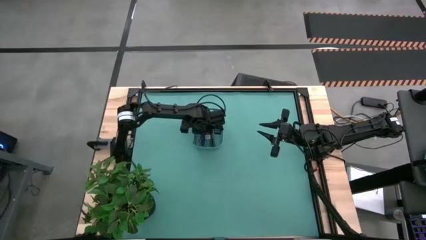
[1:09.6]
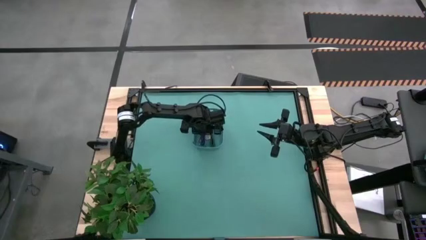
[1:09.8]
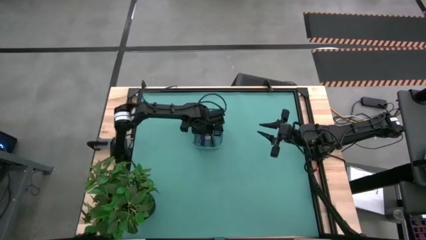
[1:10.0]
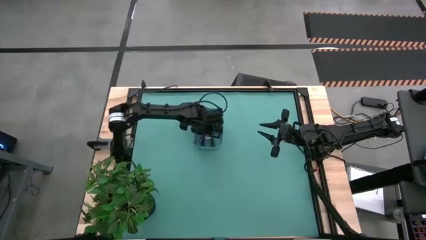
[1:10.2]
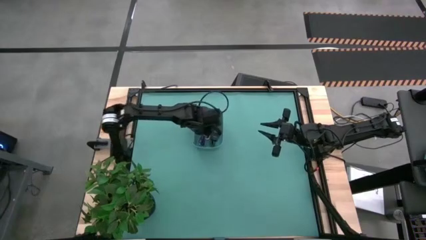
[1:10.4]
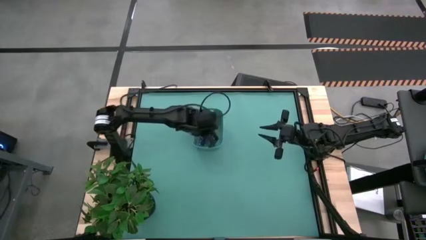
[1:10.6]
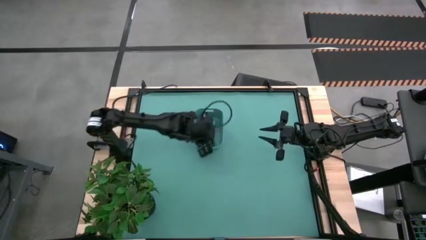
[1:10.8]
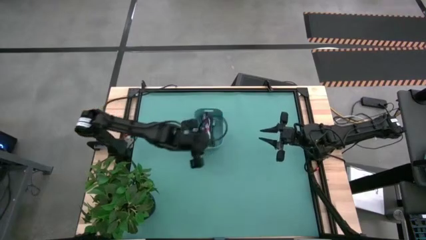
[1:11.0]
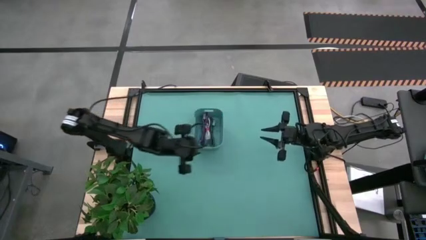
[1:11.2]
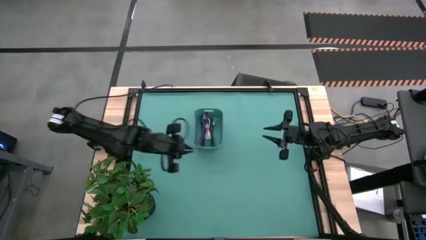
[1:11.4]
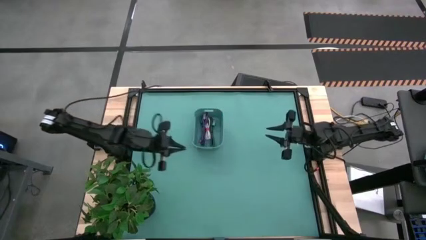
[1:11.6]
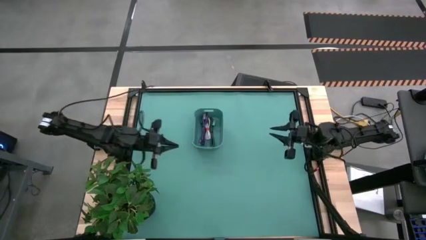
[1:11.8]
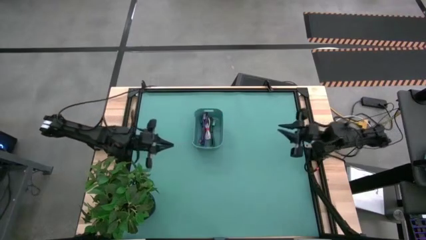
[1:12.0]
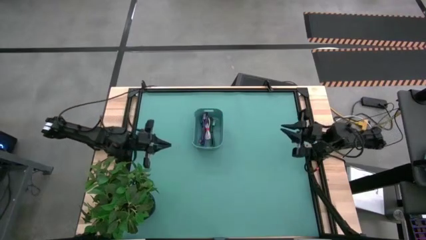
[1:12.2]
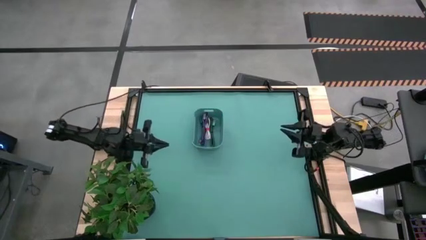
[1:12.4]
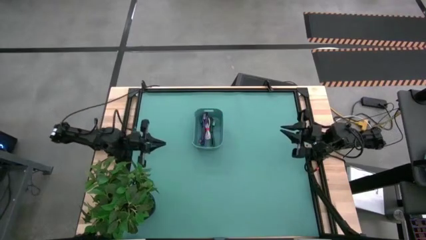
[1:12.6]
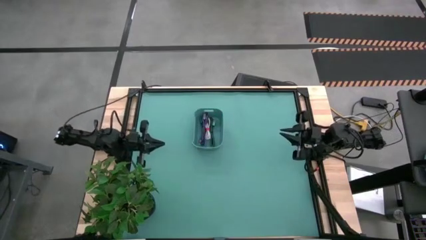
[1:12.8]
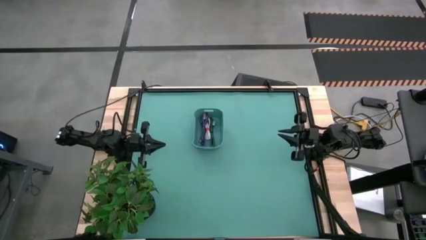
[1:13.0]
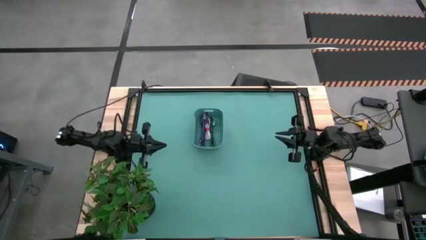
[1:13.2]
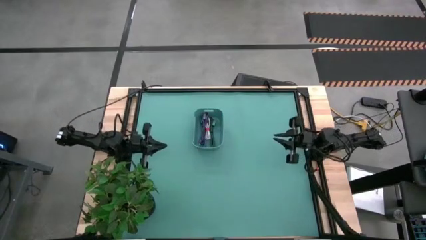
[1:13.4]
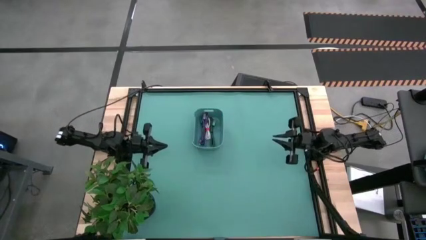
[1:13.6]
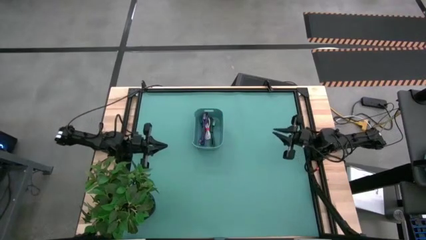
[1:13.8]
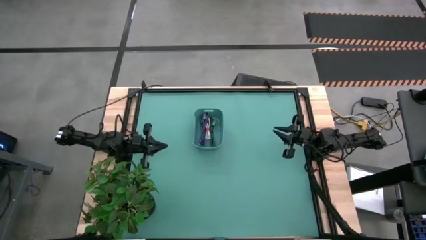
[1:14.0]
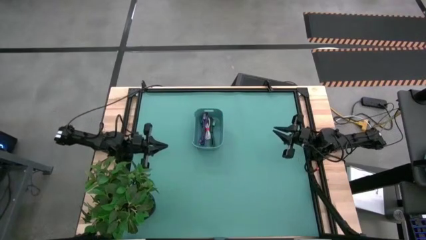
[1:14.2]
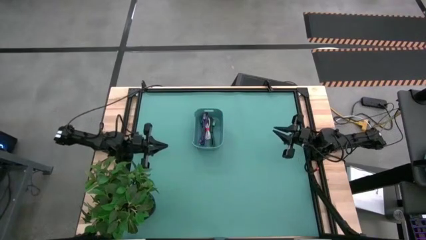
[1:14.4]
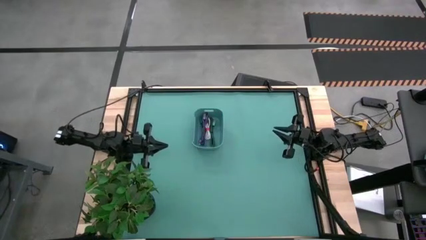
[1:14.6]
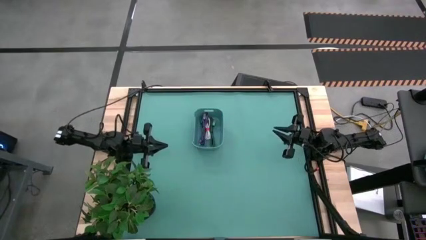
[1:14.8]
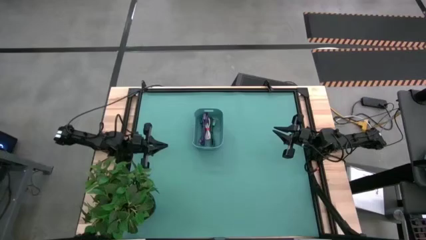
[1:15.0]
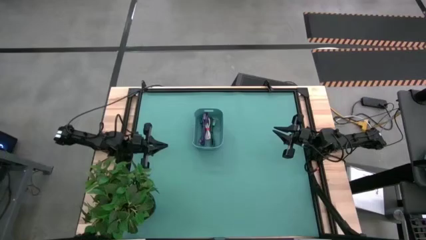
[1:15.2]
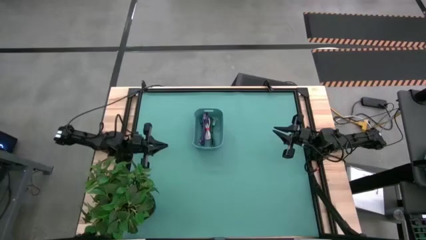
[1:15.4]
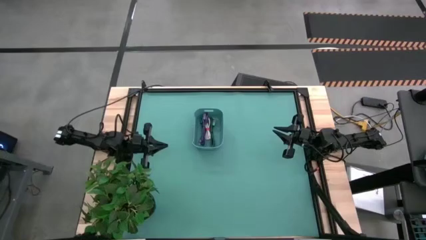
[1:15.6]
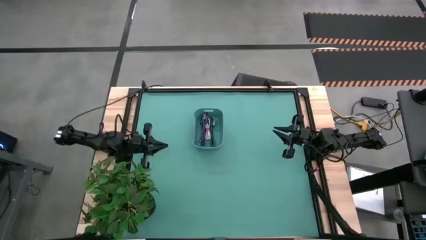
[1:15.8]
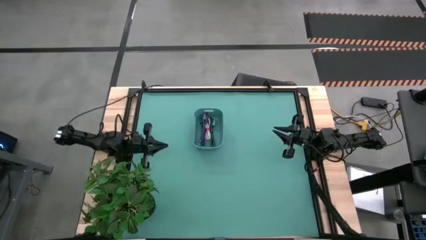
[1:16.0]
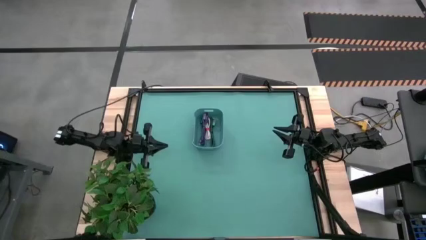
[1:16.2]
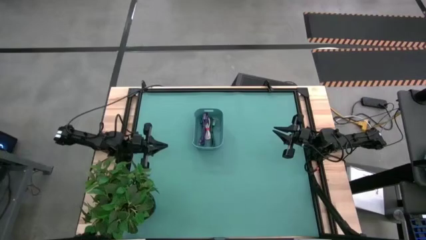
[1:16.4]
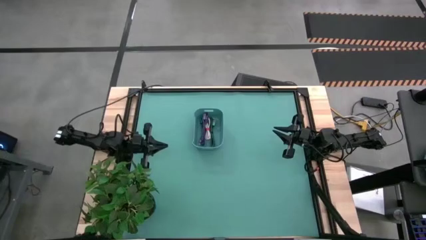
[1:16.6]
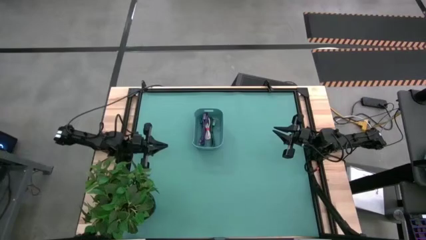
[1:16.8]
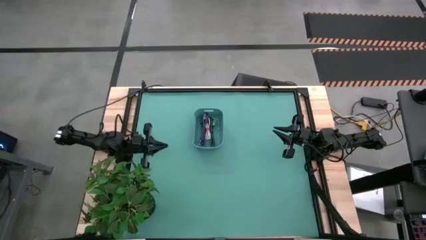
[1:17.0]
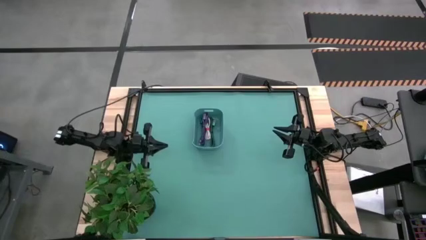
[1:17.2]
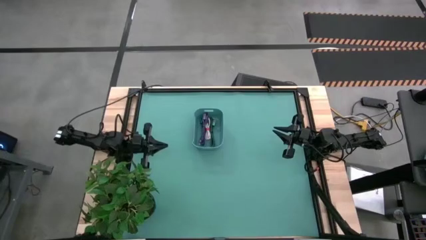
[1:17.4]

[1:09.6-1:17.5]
Task: Pick and place USB-C Cables
Return to Home Position

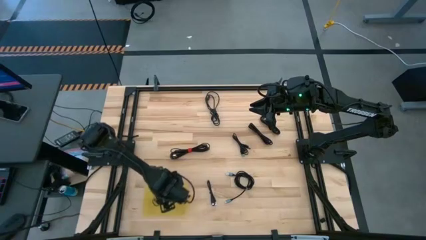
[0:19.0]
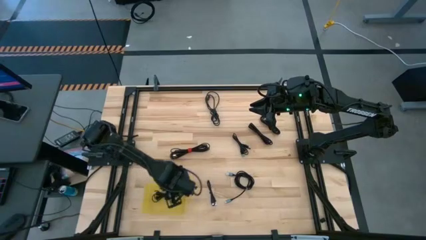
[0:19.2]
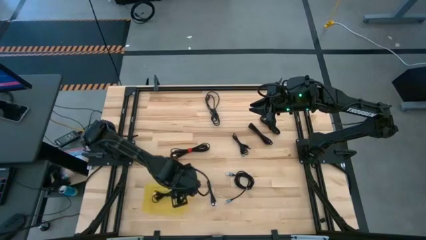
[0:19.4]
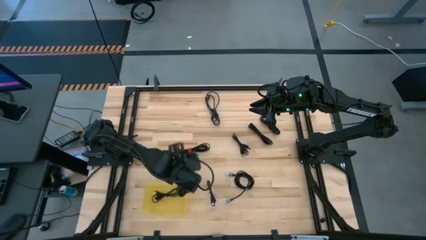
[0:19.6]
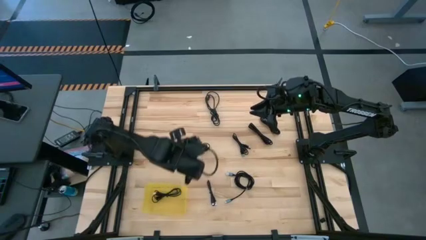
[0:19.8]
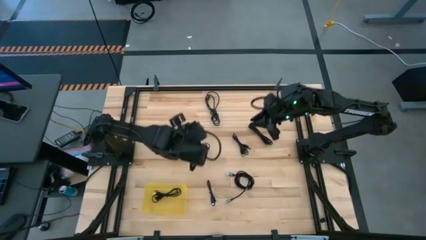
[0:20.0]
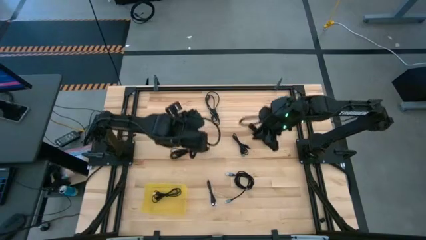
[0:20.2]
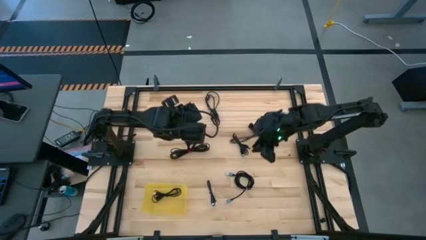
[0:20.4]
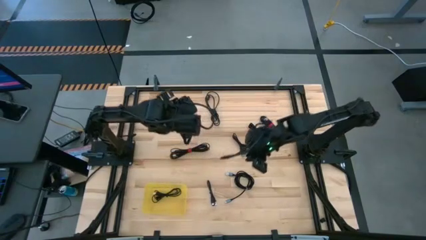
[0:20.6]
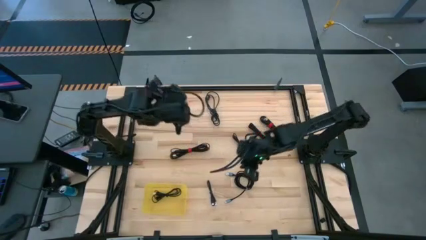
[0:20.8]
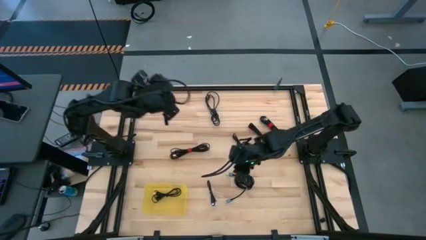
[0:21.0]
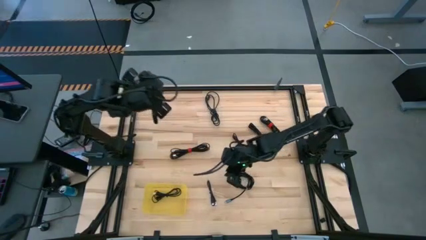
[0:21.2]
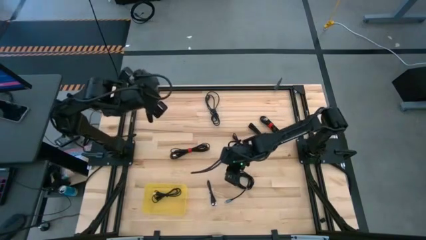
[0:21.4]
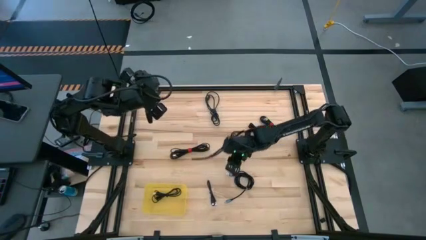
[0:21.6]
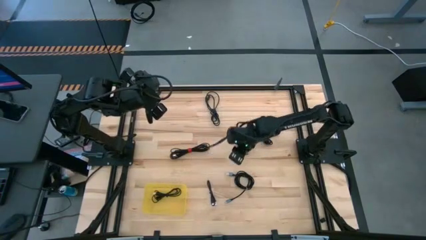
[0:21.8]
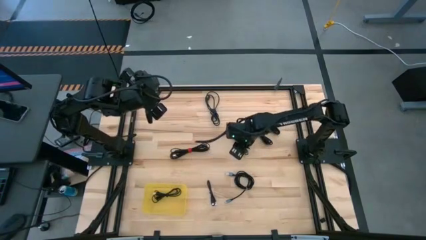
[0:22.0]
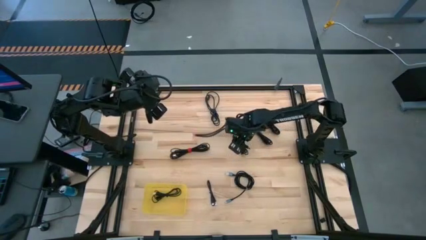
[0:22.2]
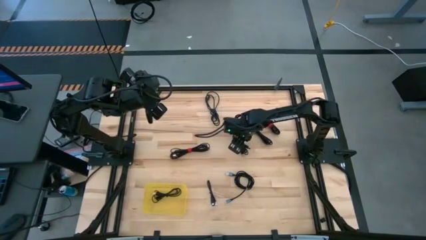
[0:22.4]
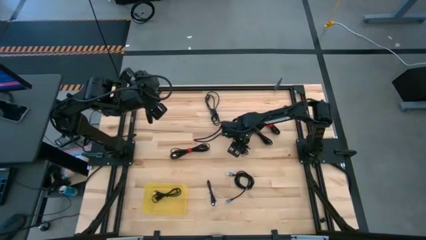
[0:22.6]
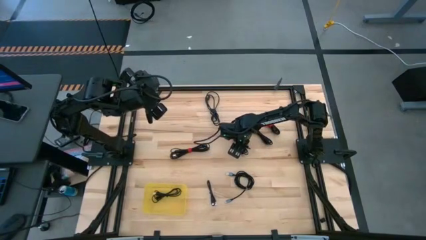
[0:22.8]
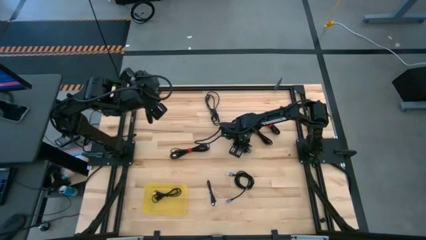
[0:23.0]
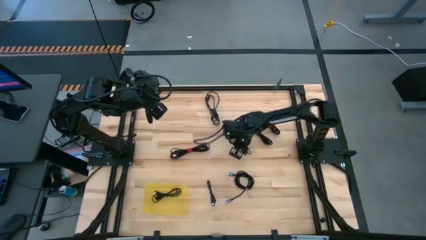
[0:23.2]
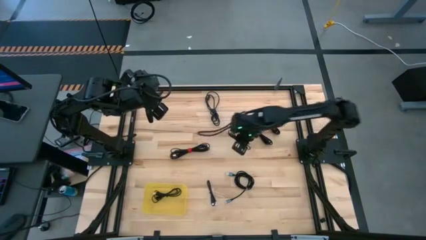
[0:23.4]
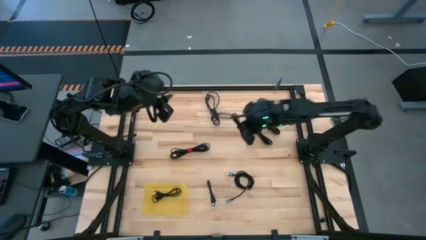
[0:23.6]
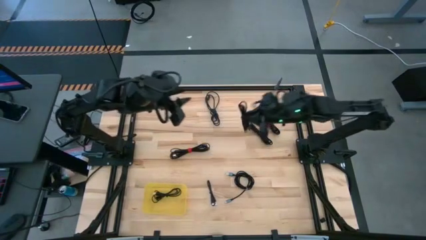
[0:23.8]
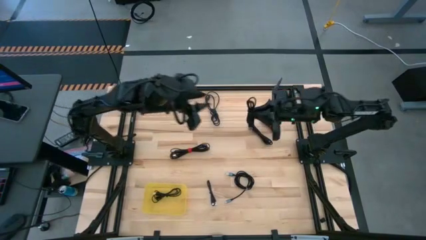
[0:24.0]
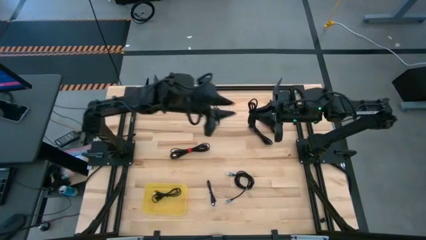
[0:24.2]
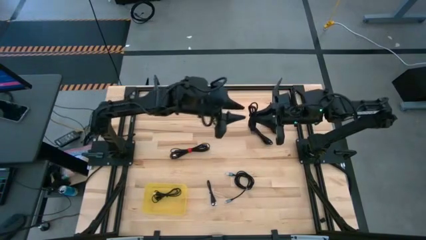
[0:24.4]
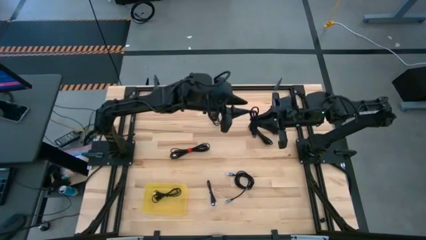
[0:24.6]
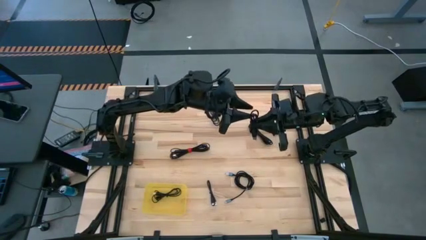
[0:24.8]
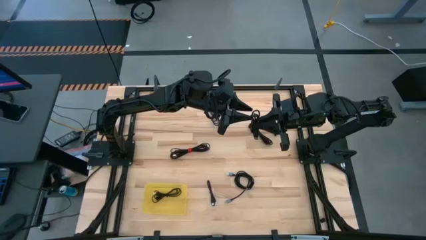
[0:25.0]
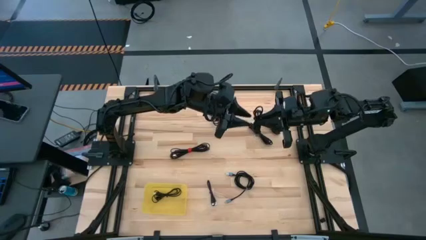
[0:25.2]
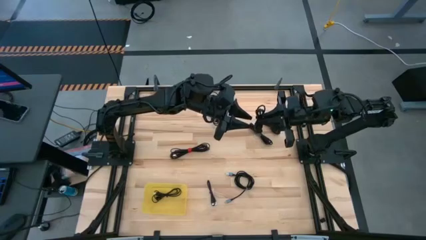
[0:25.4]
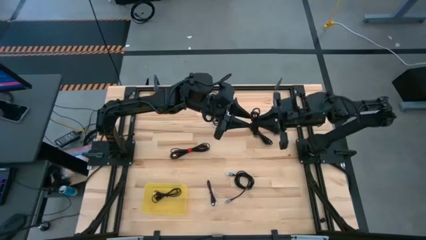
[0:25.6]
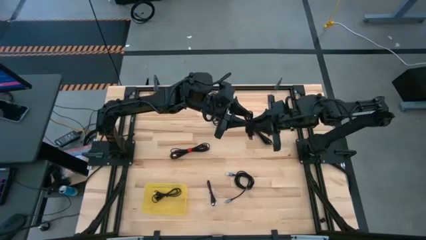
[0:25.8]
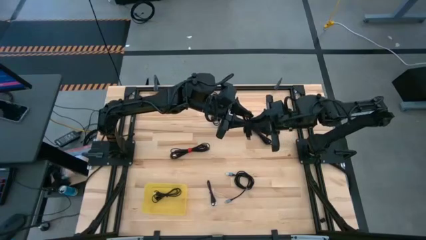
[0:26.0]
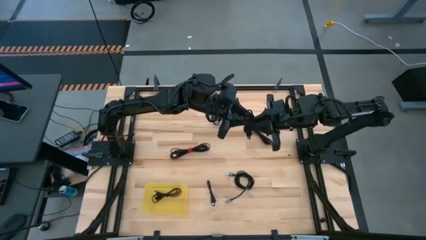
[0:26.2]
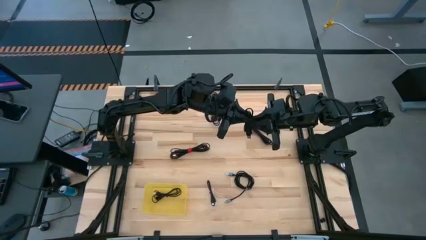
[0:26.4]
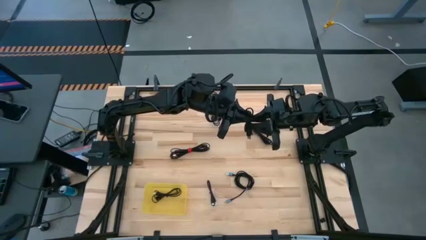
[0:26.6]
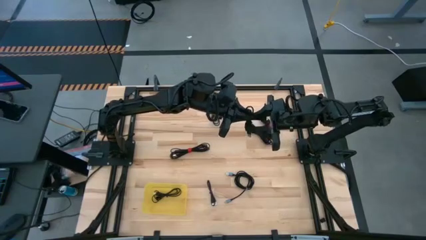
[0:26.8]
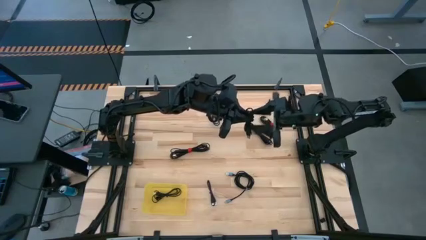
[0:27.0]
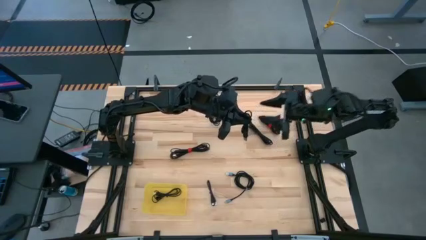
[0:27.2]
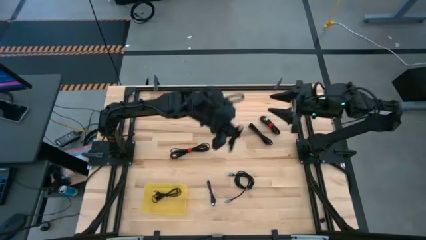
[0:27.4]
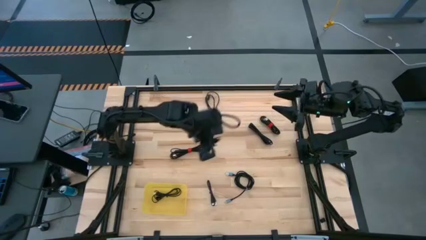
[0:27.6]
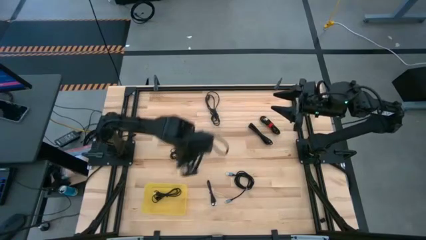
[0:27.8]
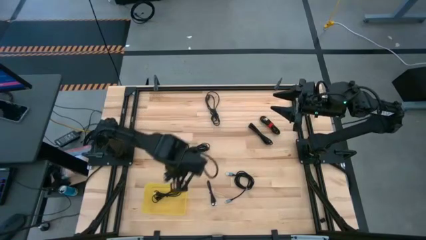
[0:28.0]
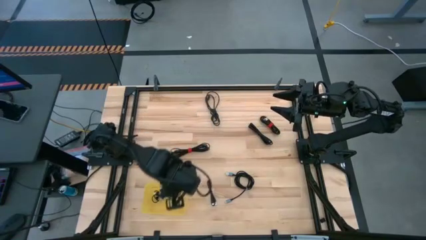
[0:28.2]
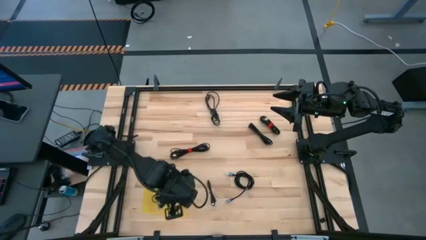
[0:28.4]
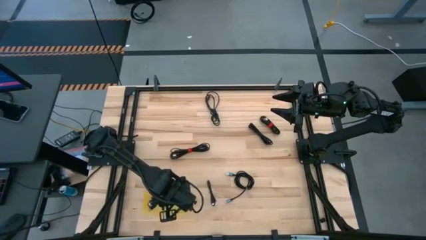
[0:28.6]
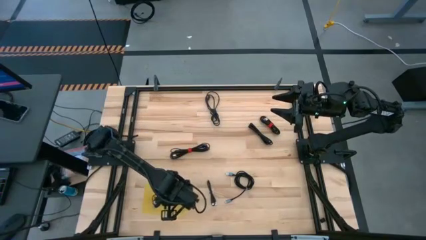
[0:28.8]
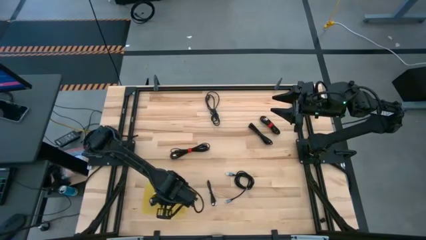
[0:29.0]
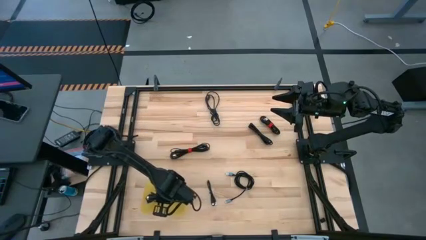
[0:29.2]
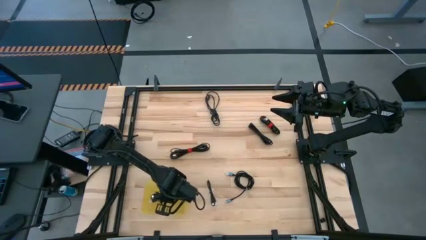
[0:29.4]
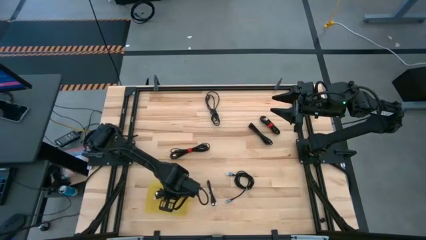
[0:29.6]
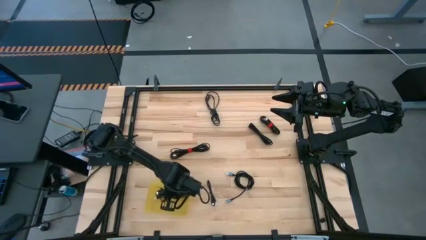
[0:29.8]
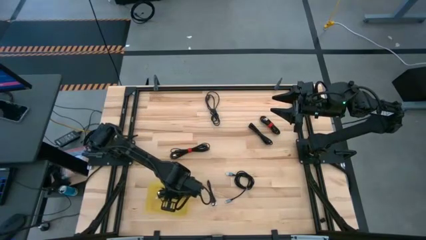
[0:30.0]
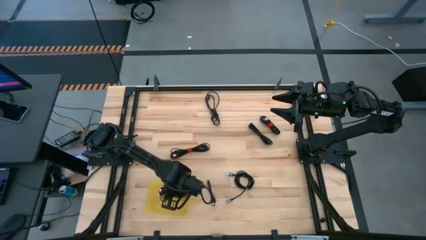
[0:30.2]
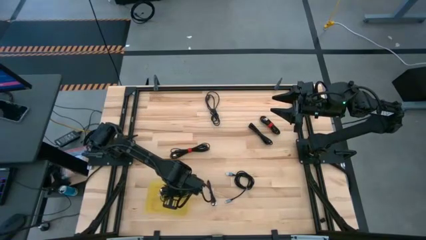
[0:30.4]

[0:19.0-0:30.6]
Task: Pick and place USB-C Cables
Put the black charger cable into the yellow bin
